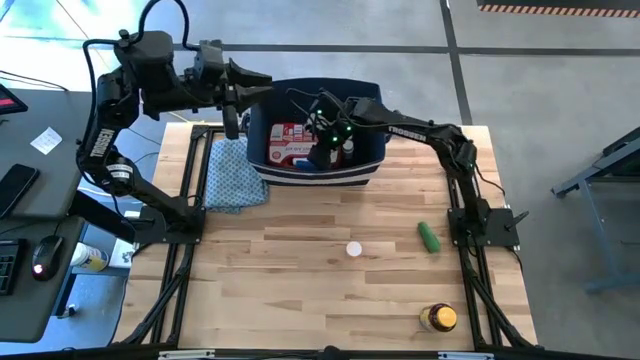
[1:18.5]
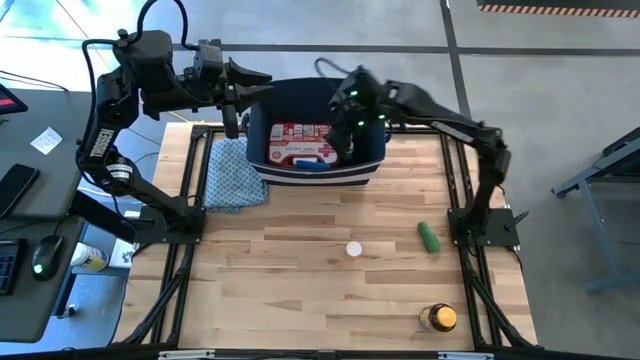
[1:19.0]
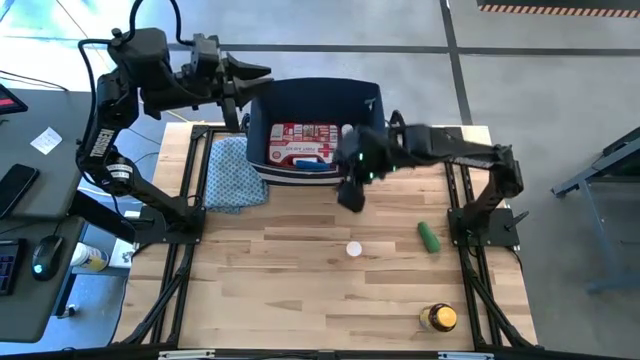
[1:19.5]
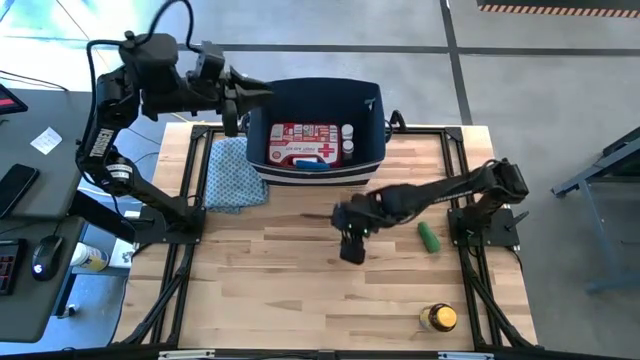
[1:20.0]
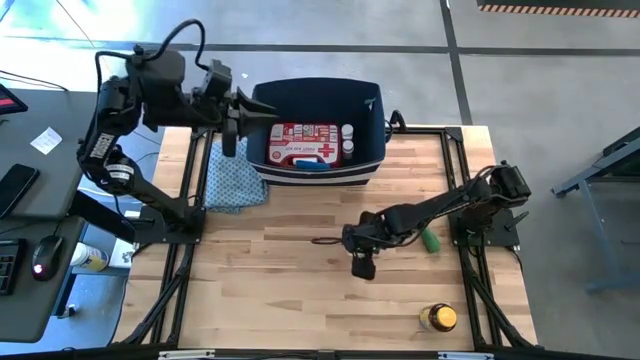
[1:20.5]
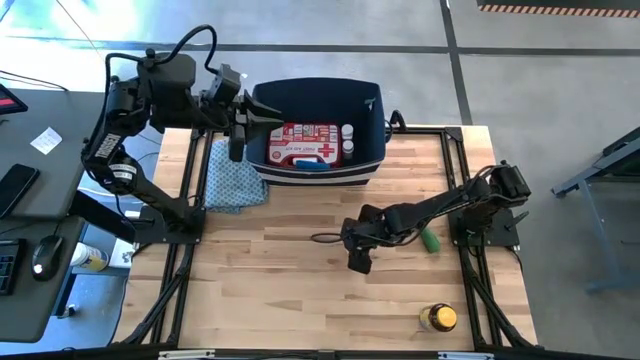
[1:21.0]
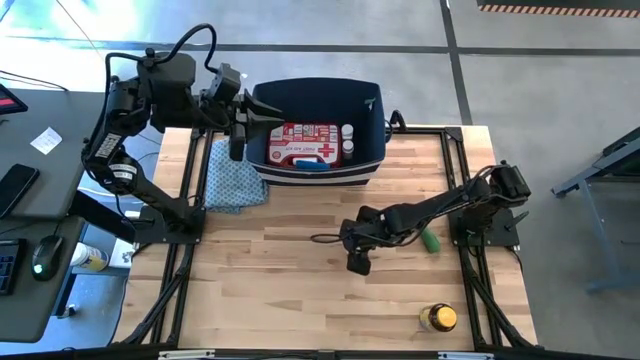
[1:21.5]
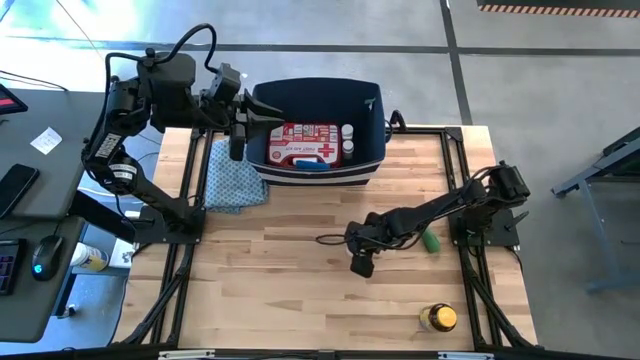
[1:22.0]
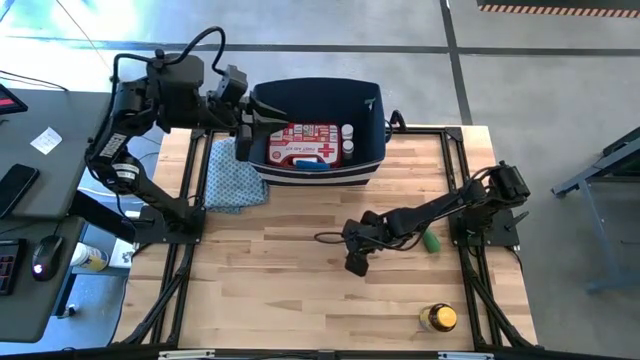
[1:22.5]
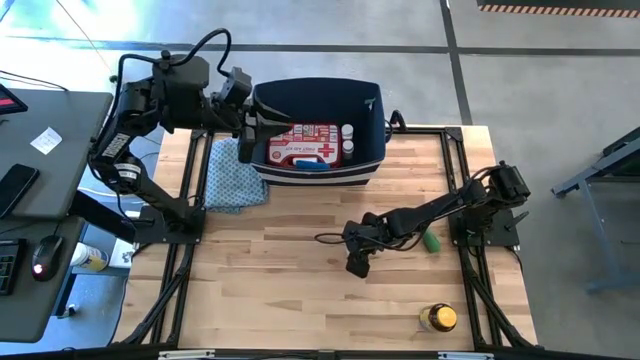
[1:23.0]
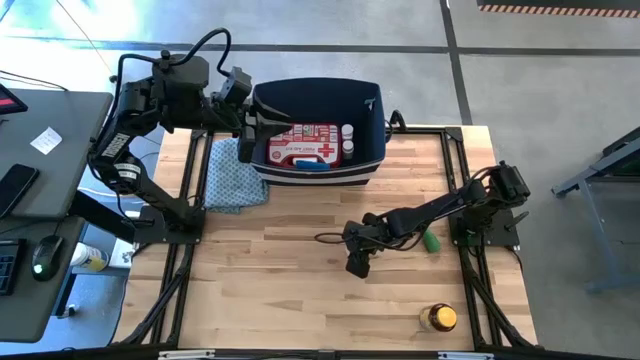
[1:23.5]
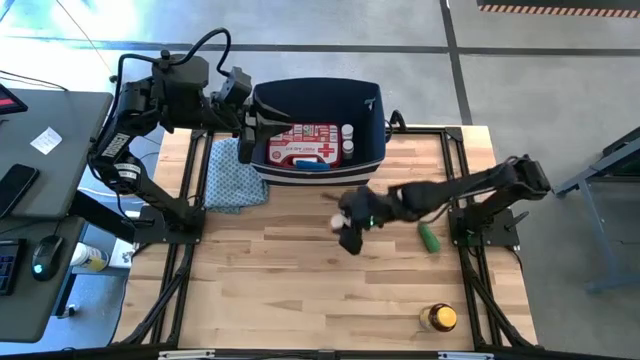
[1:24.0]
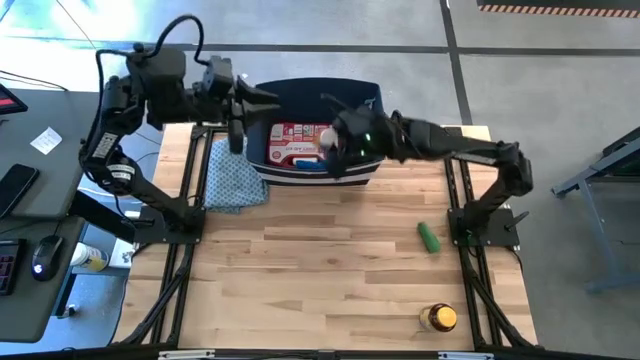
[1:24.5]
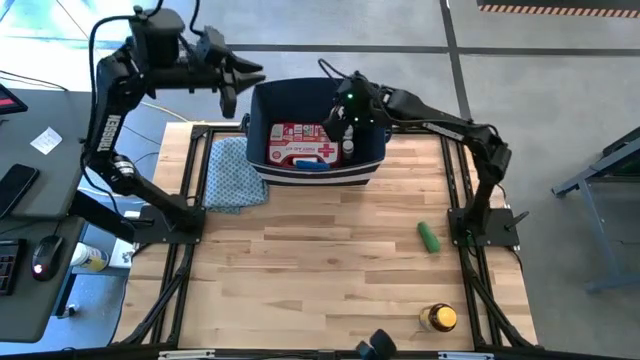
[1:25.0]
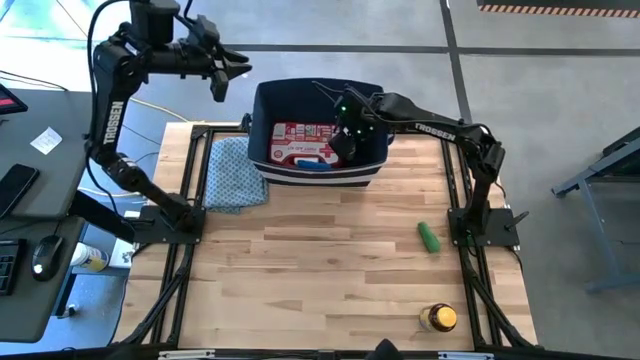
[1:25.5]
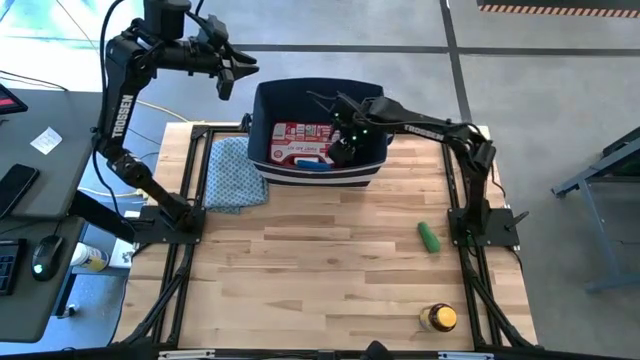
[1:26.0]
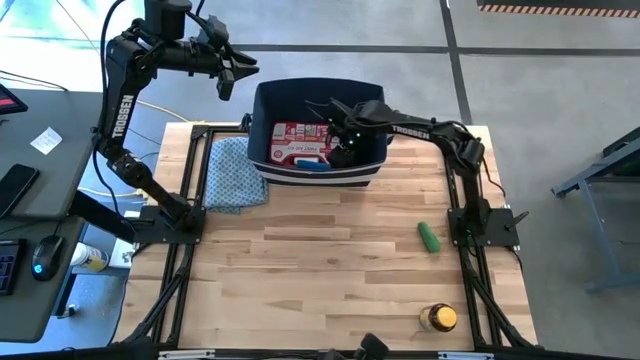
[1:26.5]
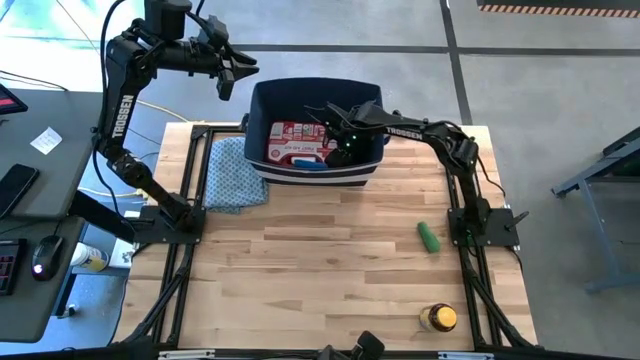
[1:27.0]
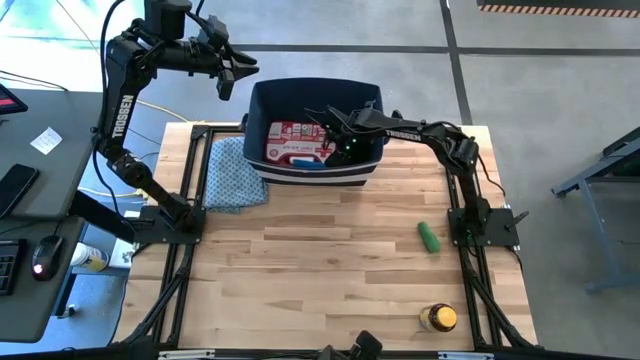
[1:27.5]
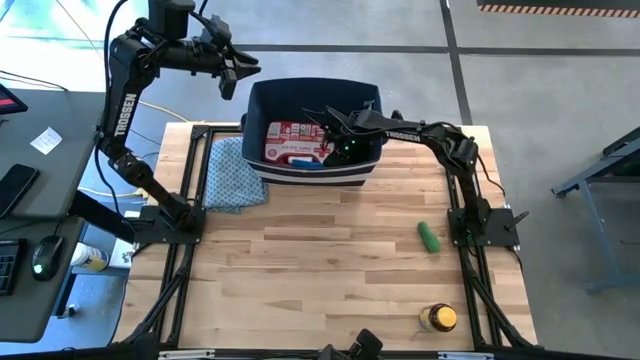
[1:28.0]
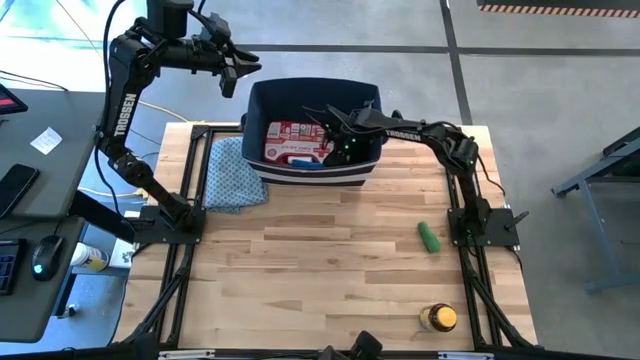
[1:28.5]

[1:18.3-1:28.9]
Task: Pick & place medical supplies in basket/bin
Put the orange pill bottle into the blue bin

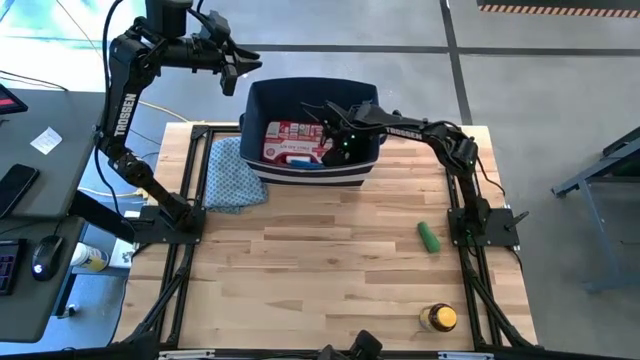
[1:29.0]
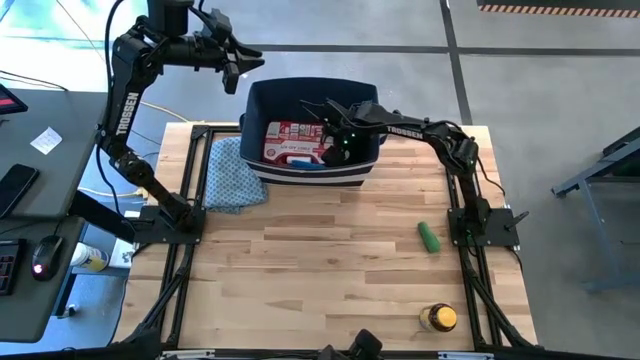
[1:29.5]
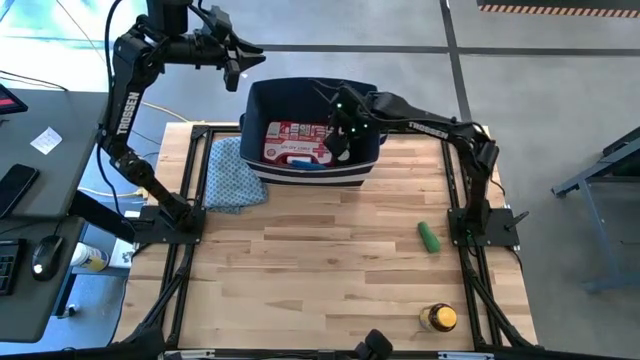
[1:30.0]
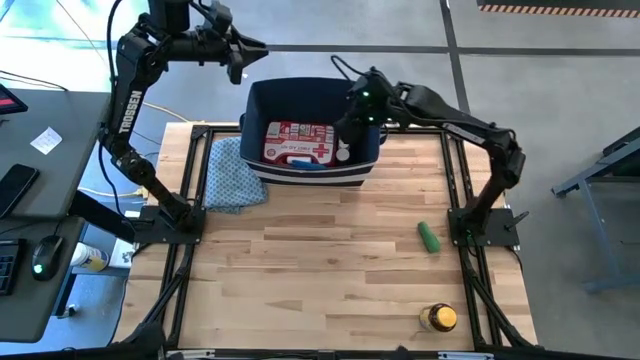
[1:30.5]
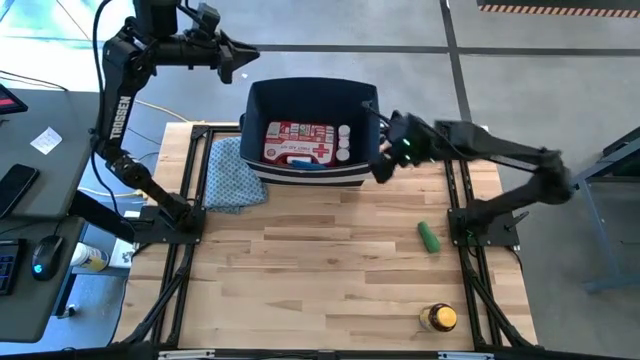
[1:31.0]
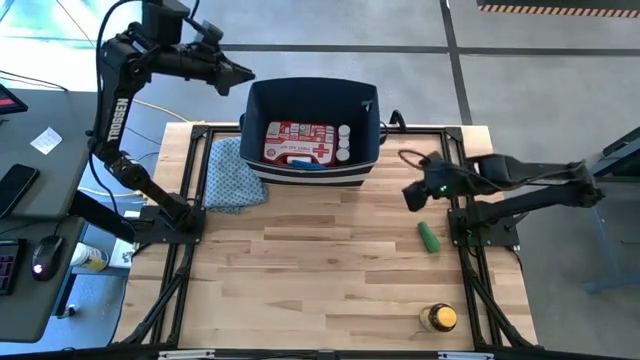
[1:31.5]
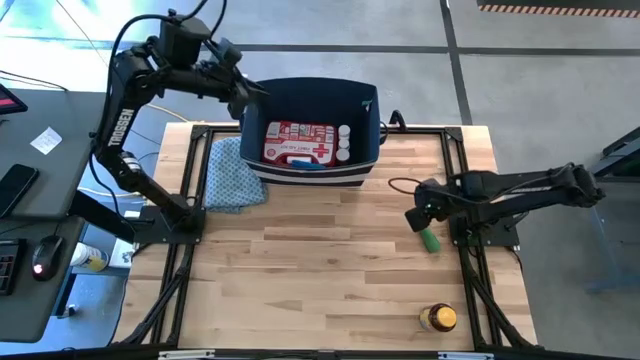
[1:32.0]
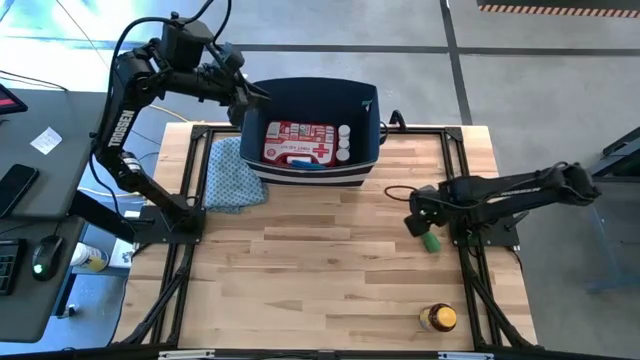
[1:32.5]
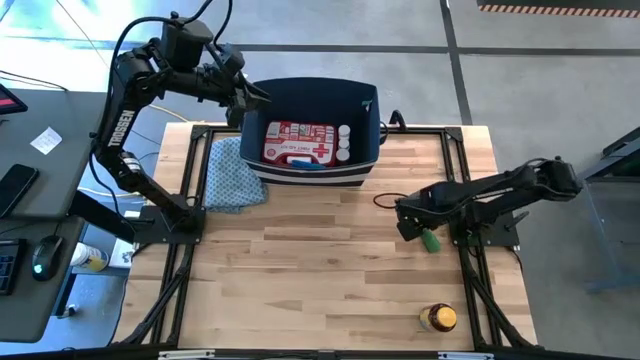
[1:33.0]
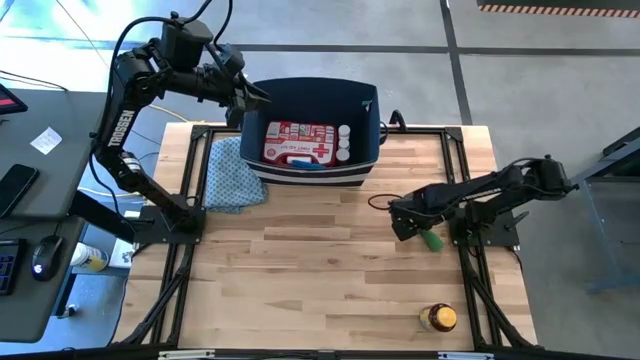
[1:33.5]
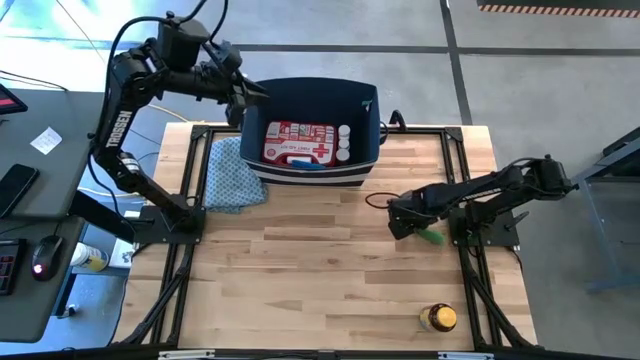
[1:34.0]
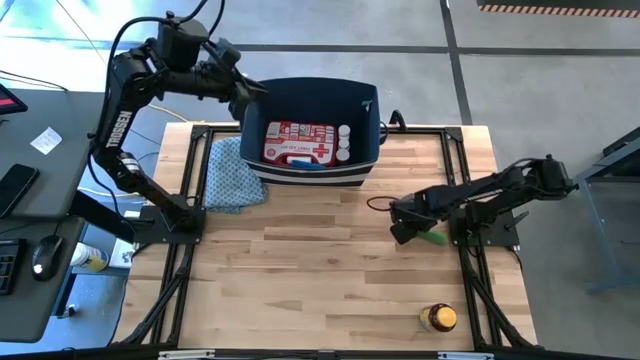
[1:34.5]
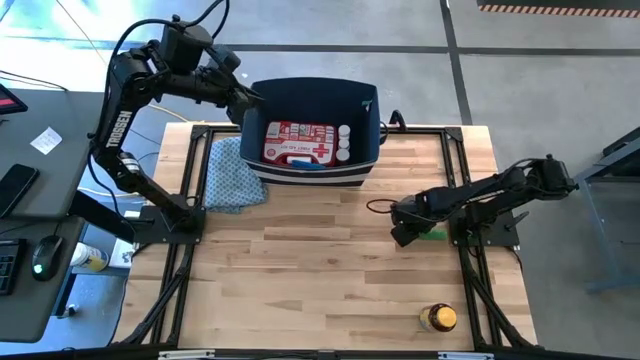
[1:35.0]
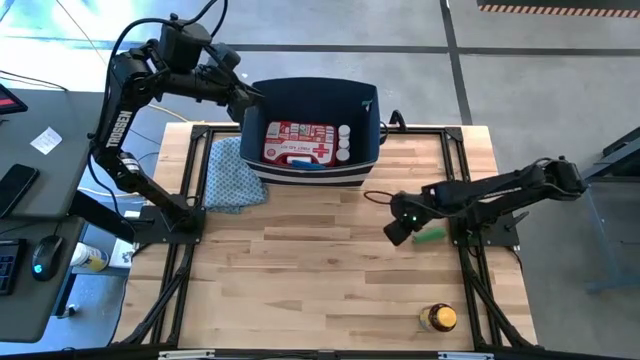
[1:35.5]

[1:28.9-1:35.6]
Put the green bandage into the blue bin

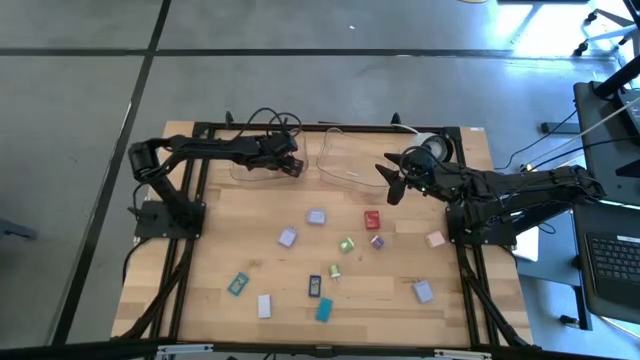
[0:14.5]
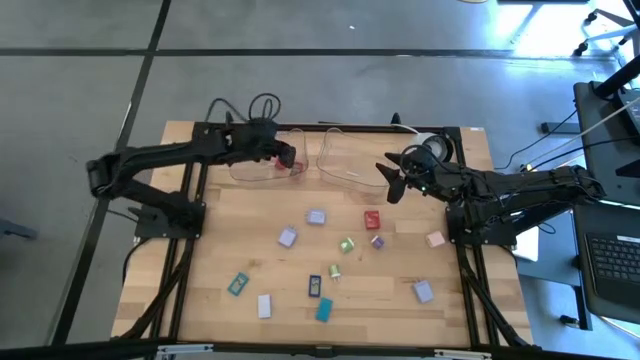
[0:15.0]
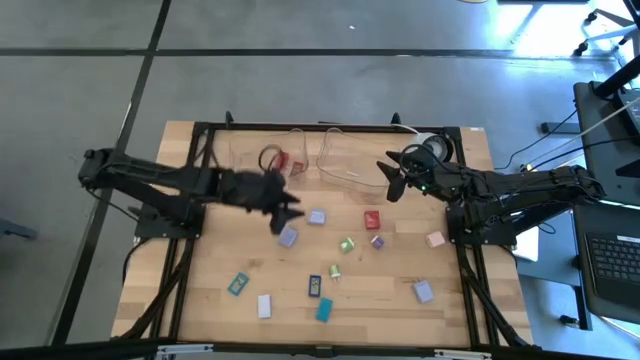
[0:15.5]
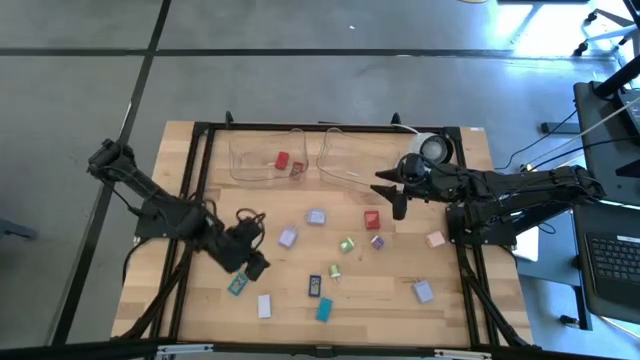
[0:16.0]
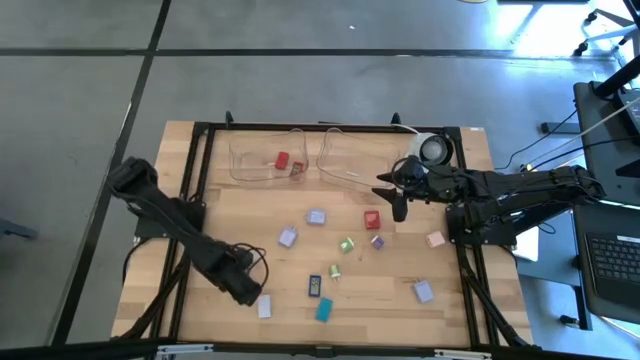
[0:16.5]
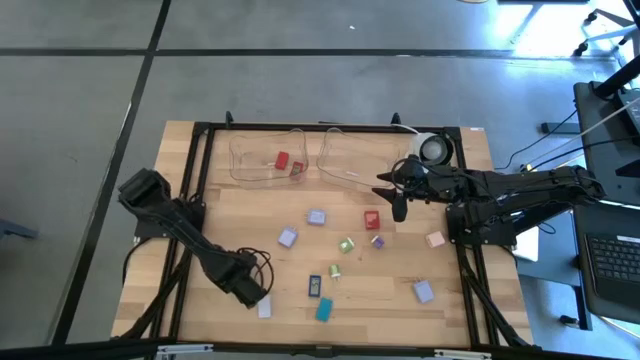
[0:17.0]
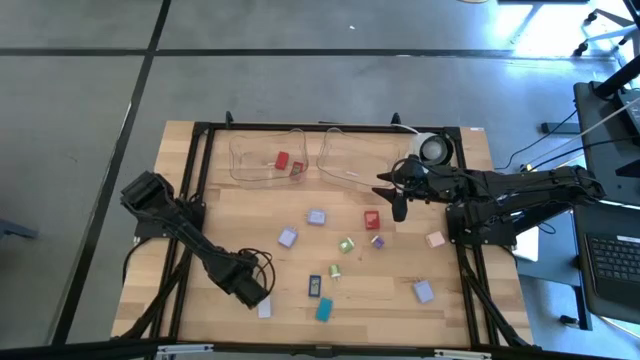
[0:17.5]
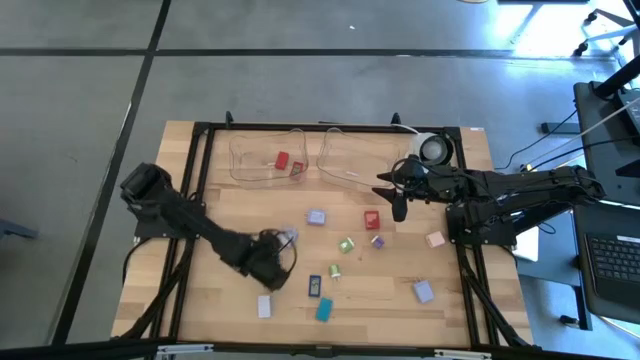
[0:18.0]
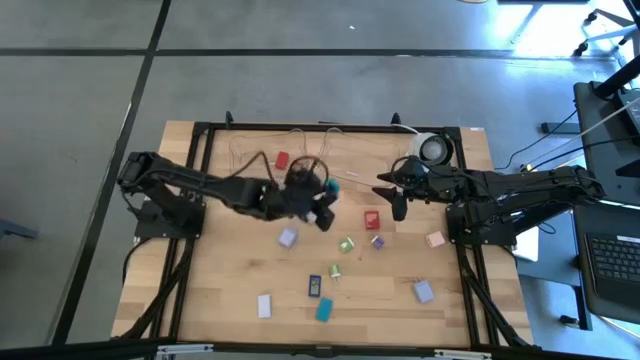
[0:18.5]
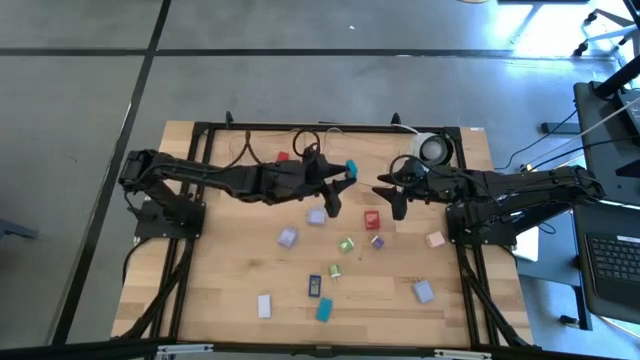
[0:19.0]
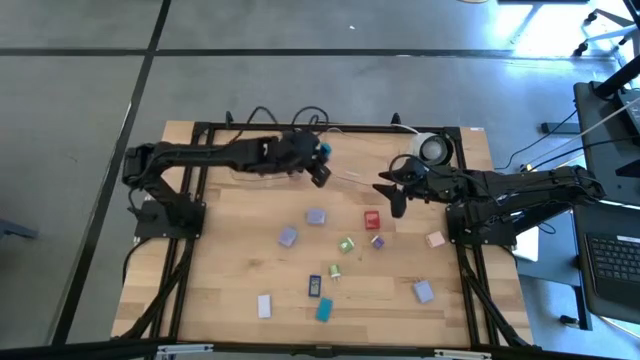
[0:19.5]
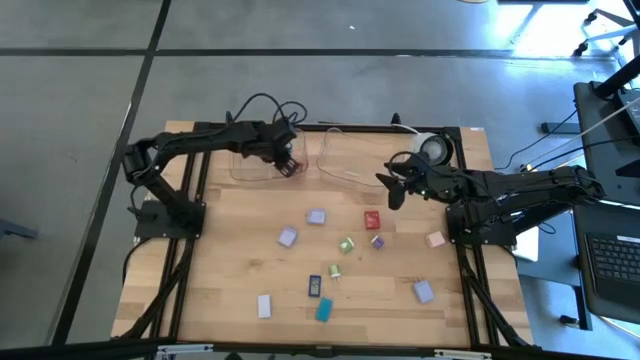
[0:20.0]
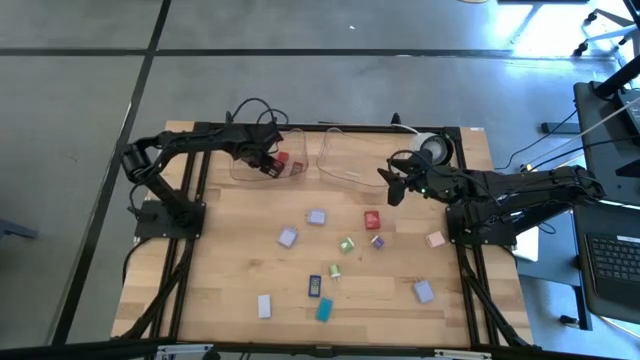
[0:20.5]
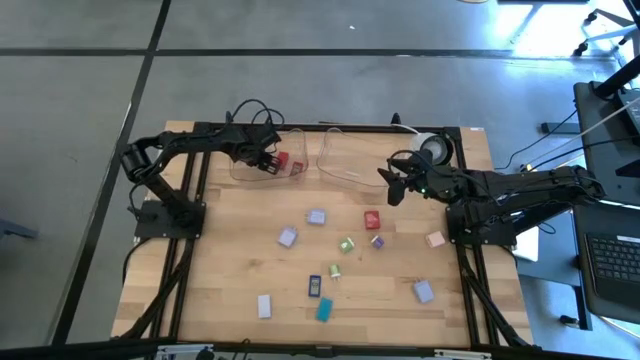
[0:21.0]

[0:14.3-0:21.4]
Task: Pick & Place Office items
Put the top light blue digital timer into the left transparent bin
